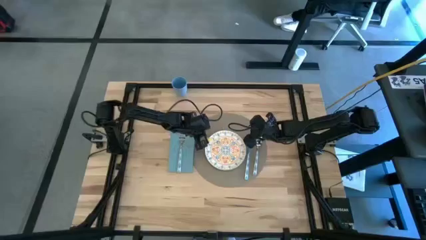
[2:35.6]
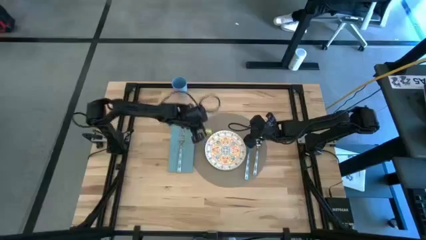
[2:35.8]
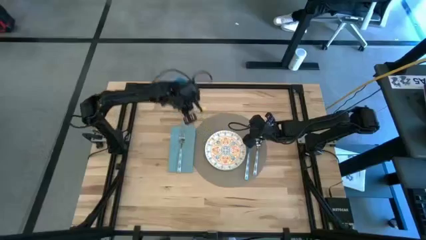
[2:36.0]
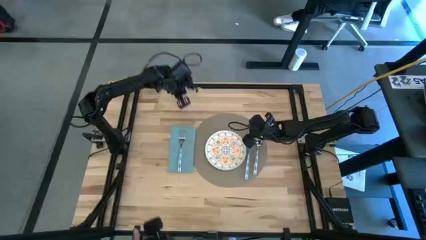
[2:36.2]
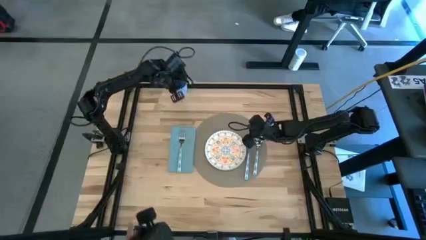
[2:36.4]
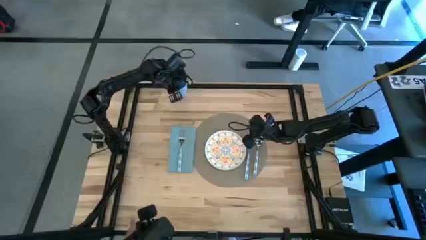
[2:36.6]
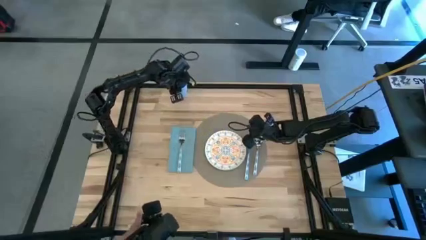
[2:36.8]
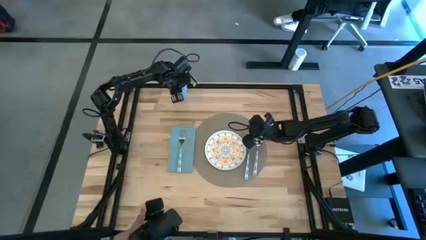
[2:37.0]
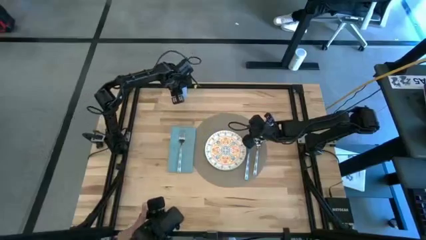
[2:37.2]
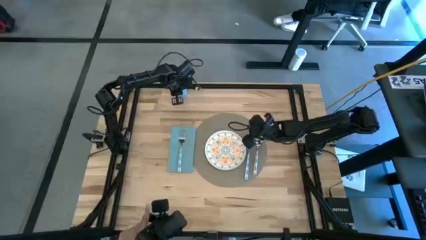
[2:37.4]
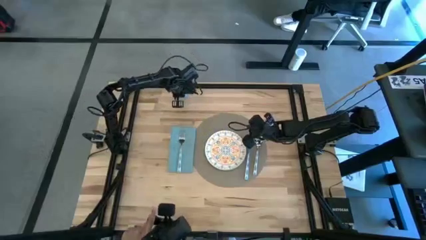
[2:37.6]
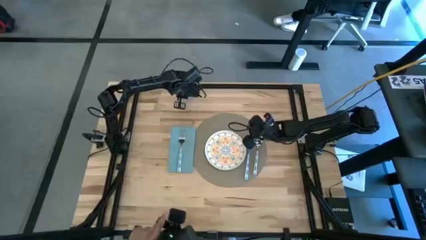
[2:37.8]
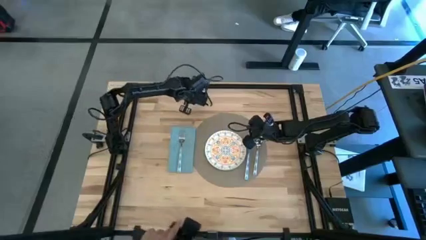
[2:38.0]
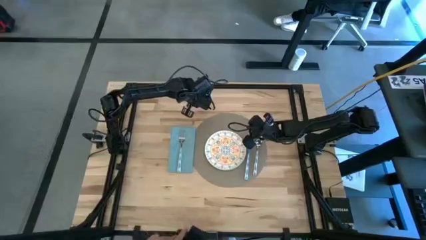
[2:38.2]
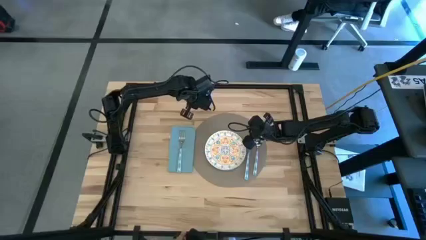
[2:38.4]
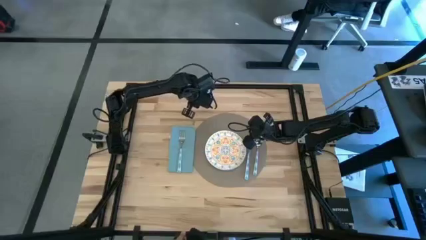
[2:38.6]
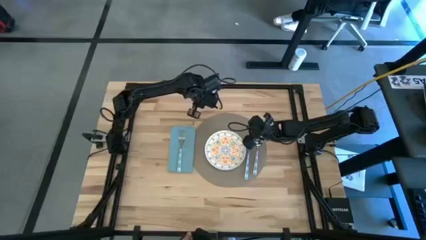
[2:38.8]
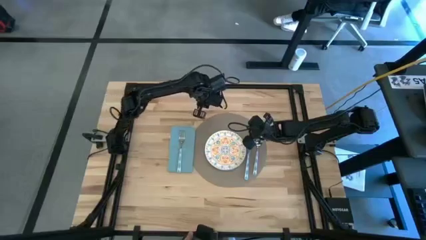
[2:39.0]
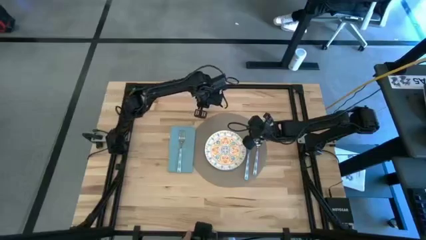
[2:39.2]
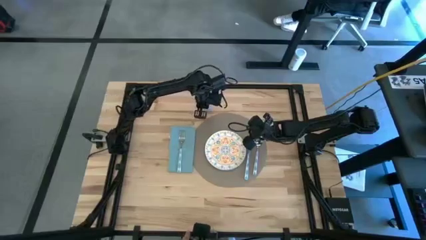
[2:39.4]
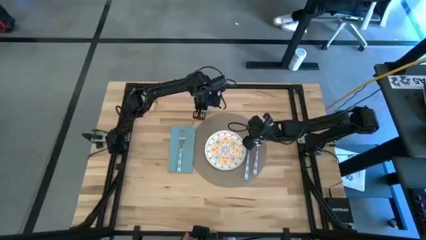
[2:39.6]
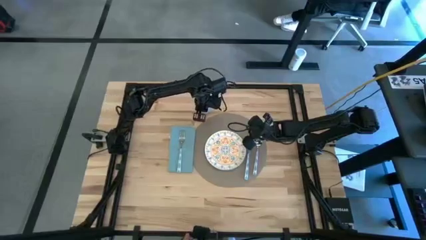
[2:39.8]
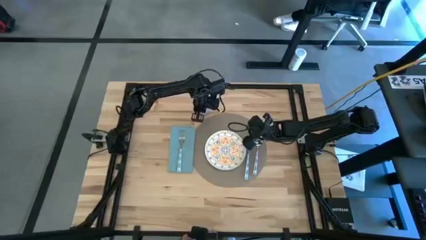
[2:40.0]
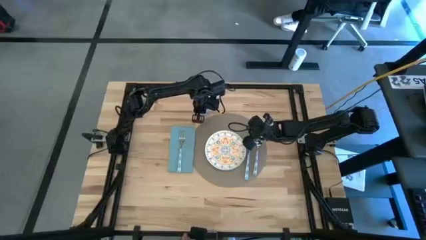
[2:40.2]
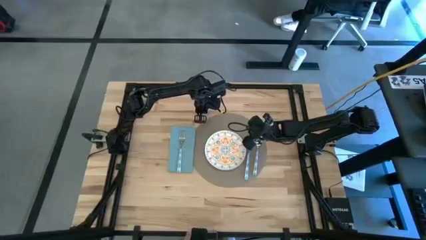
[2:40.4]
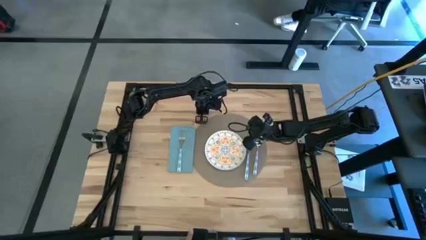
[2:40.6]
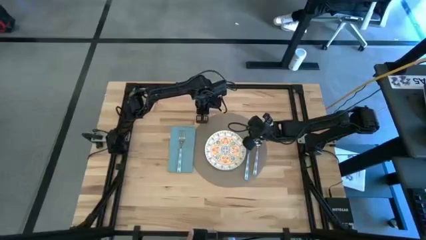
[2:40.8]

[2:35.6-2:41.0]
Task: Set table place
Move the blue cup to the top center of the table

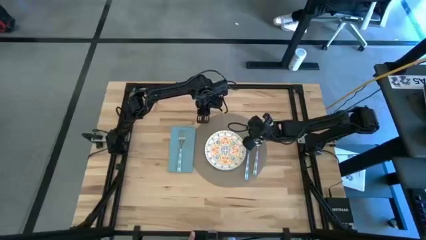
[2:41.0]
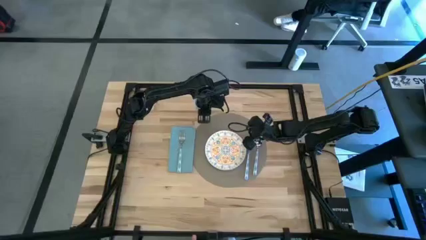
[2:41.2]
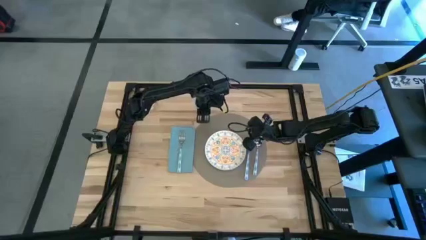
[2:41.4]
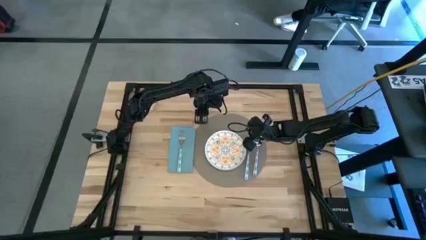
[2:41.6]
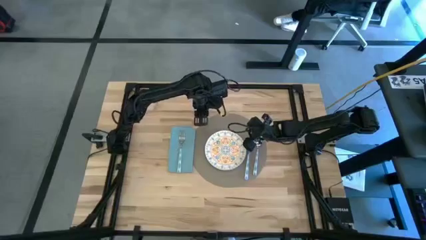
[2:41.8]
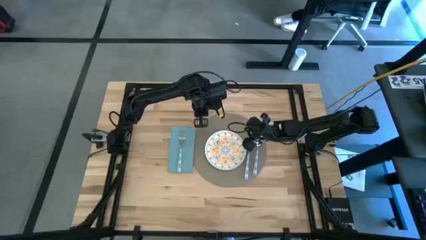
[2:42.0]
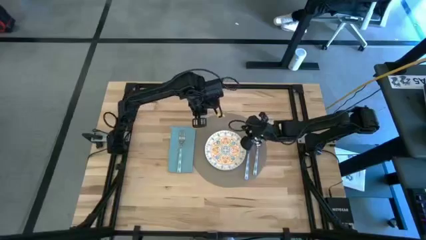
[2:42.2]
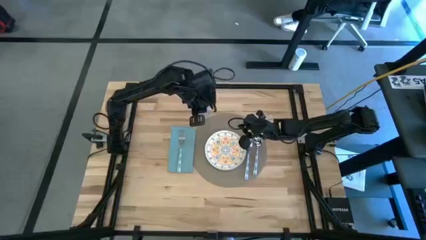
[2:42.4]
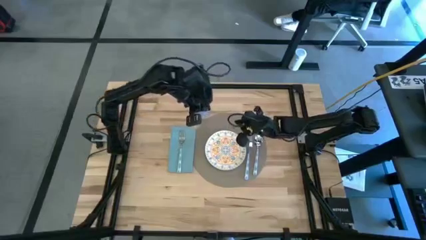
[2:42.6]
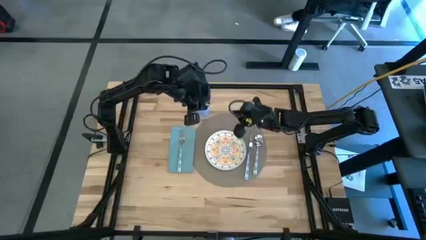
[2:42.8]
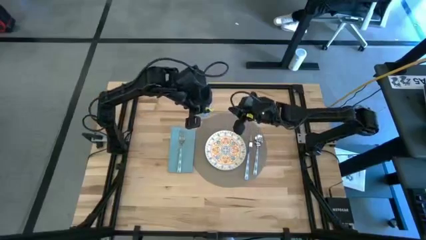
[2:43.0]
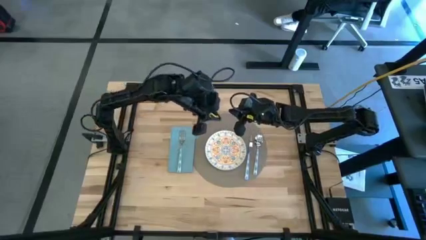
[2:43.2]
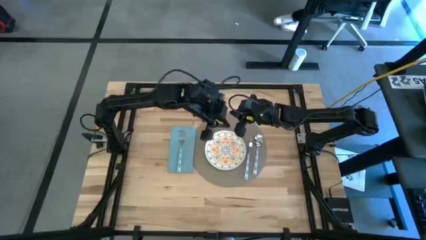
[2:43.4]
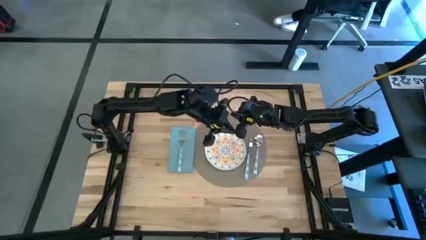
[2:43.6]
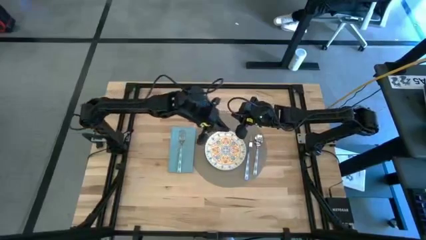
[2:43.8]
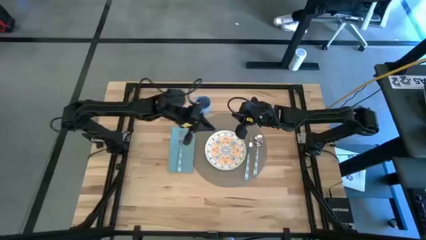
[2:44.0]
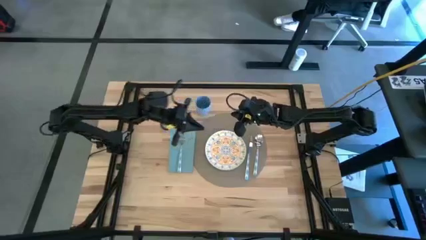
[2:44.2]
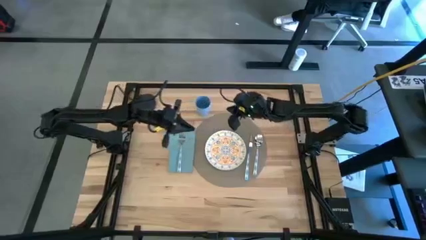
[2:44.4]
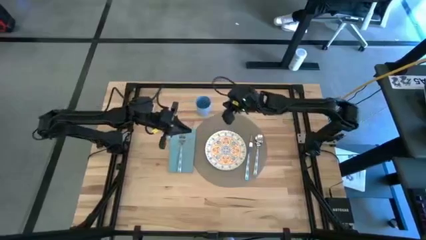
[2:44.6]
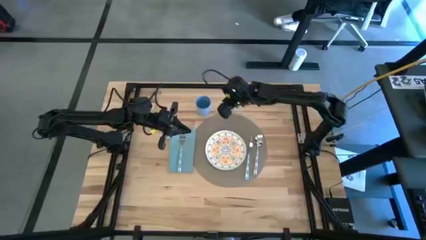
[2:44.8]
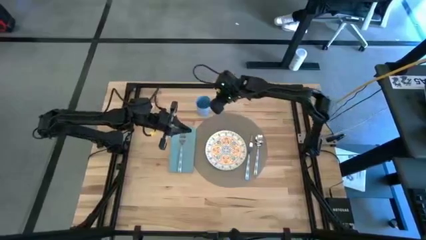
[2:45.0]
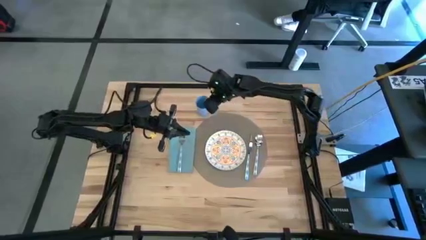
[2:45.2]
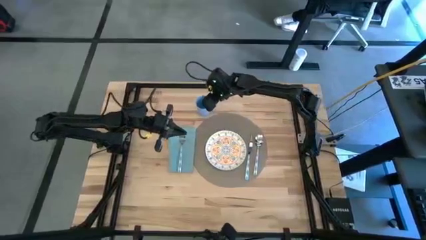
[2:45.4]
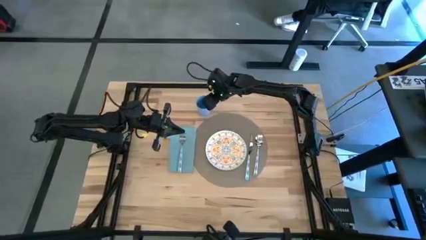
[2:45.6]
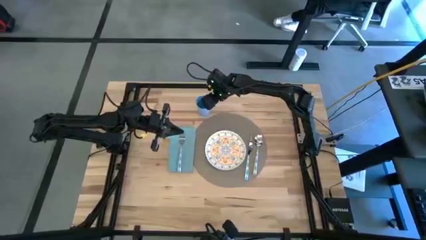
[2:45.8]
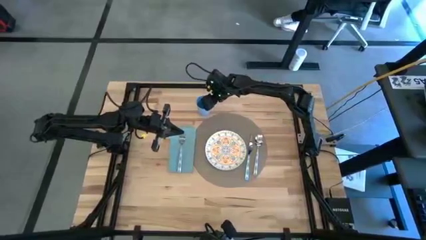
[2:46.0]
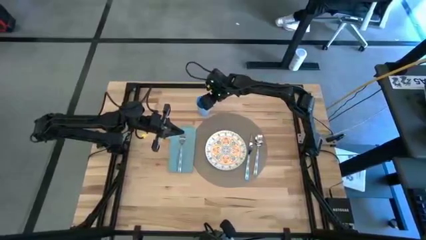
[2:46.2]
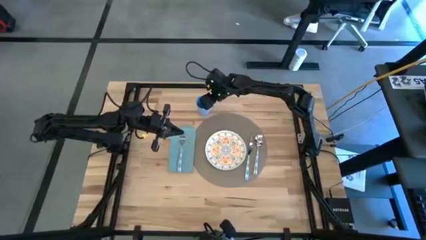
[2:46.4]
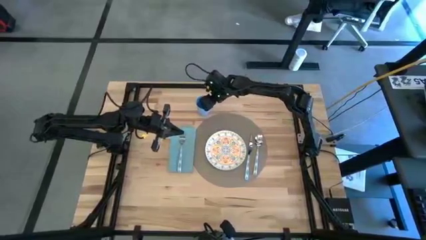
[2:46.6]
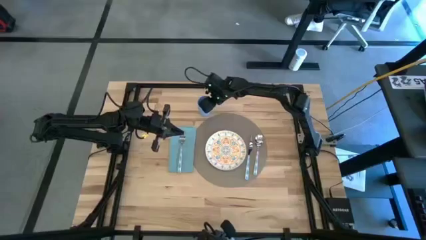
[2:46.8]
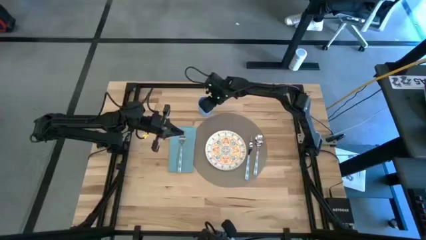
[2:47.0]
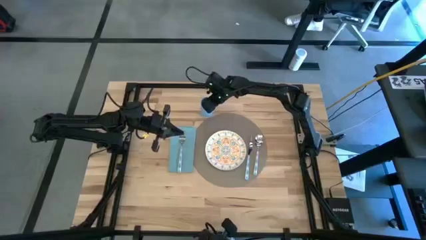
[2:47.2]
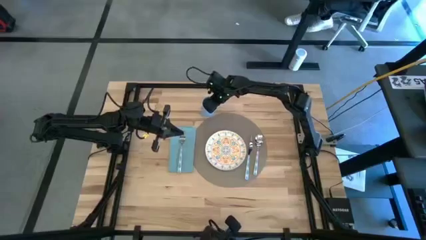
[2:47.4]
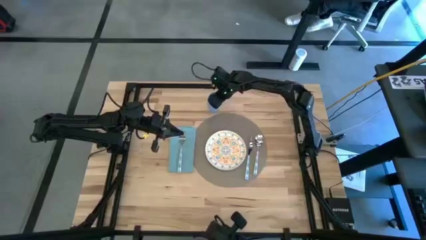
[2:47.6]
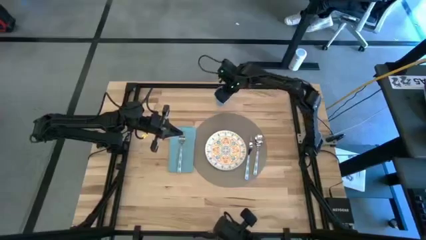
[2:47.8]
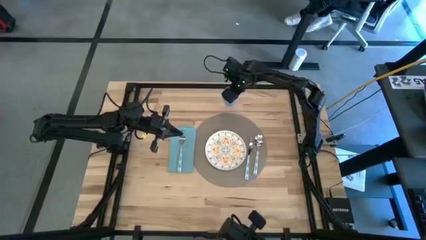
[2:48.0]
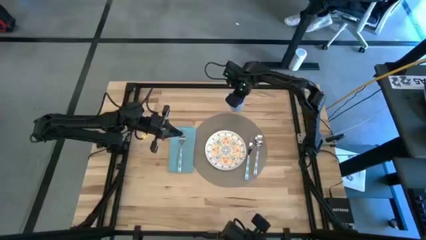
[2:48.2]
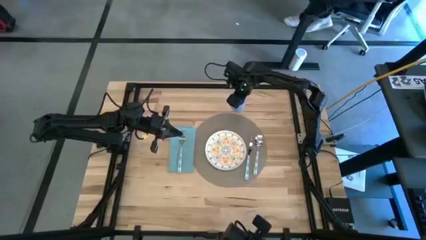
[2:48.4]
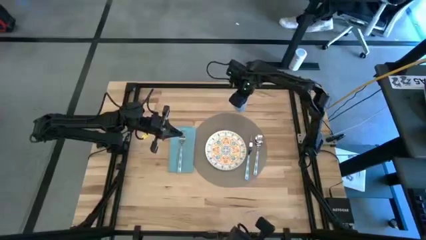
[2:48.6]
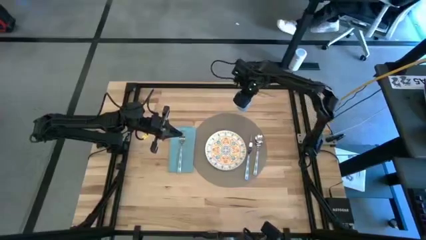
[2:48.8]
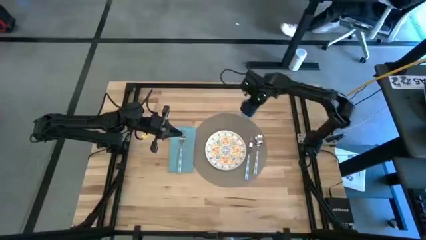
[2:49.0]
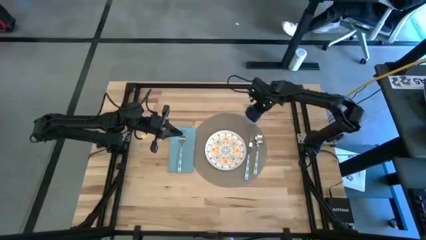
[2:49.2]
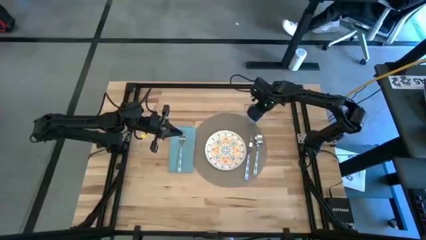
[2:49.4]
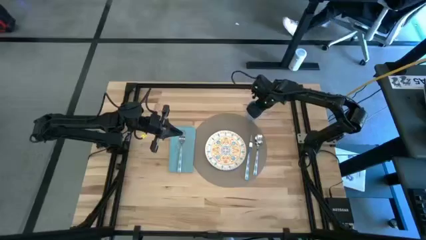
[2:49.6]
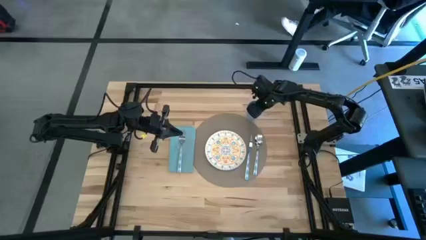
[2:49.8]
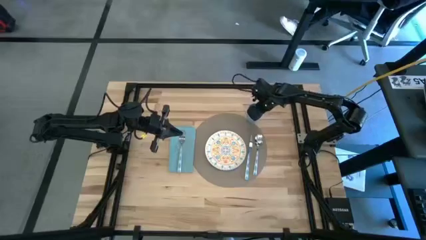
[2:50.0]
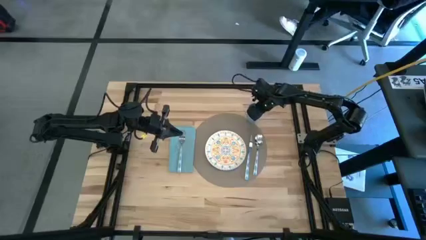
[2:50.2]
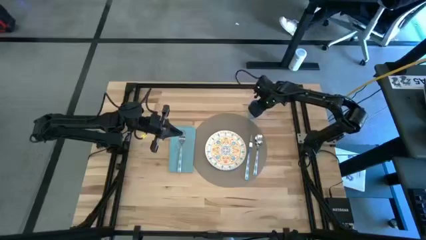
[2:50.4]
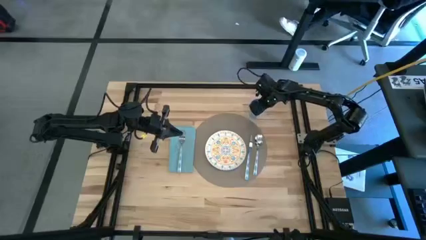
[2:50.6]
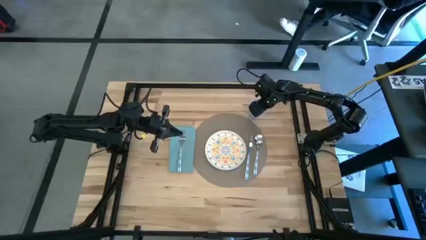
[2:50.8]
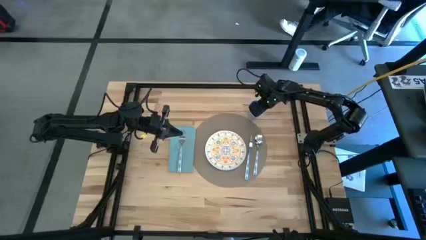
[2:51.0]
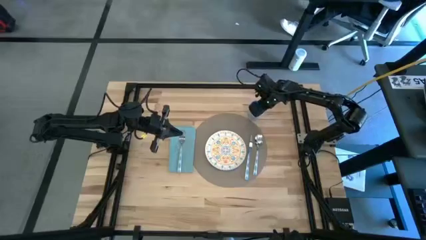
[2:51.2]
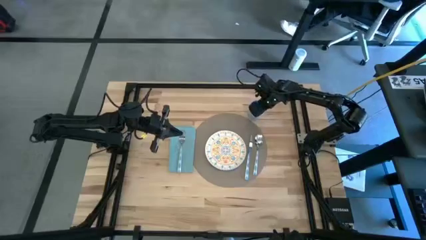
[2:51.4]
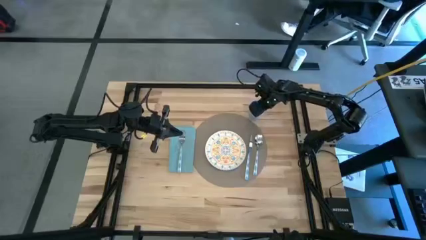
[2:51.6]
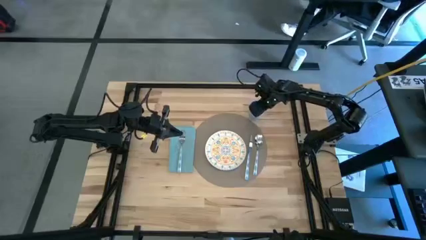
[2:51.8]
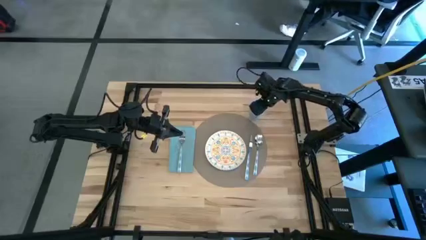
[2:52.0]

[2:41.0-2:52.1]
Move the blue cup to the top right of the table
